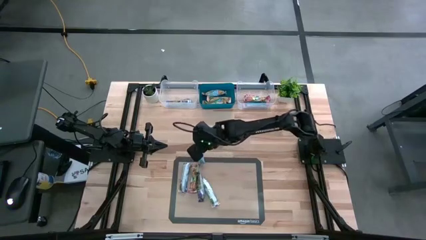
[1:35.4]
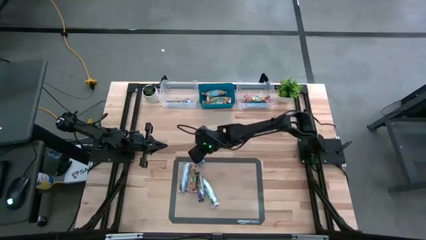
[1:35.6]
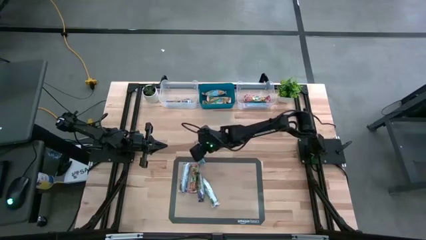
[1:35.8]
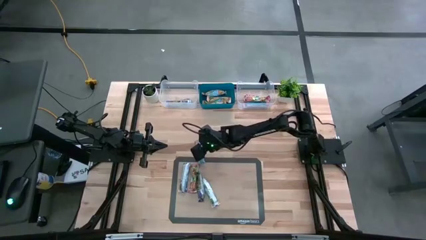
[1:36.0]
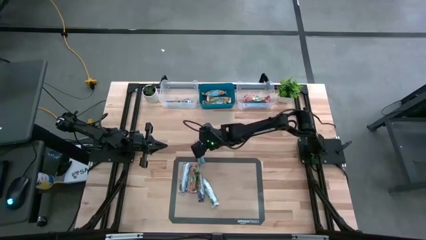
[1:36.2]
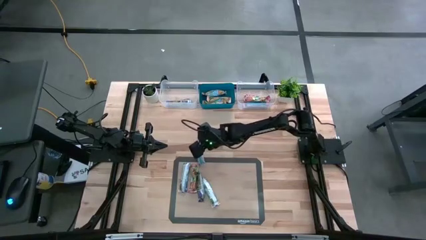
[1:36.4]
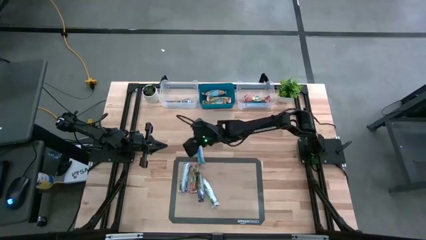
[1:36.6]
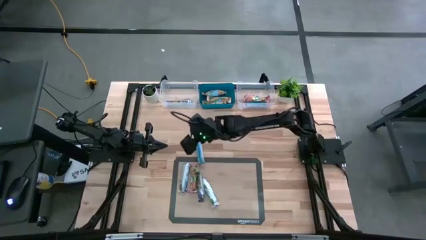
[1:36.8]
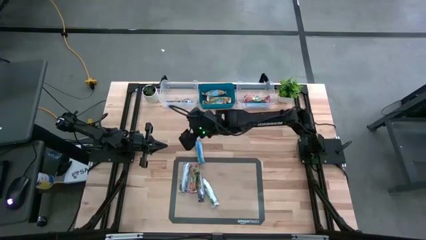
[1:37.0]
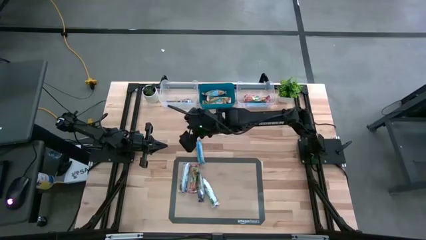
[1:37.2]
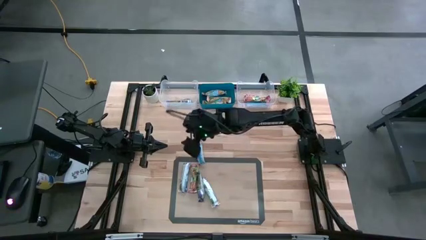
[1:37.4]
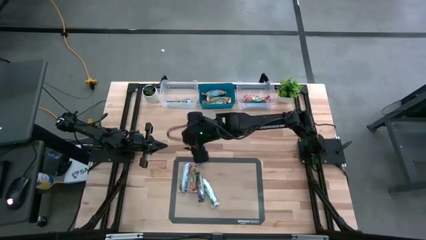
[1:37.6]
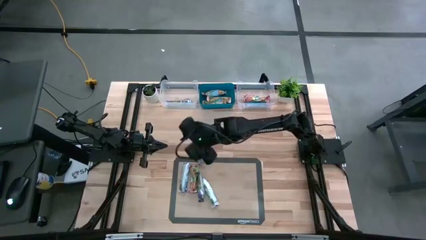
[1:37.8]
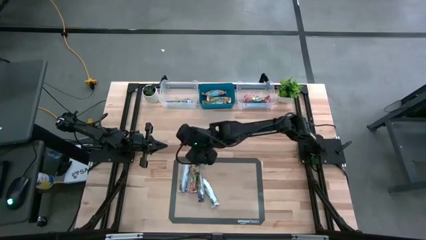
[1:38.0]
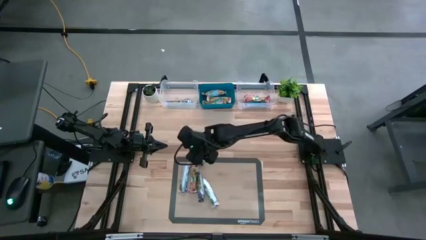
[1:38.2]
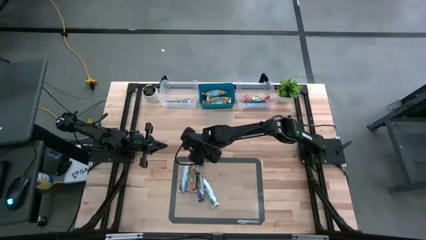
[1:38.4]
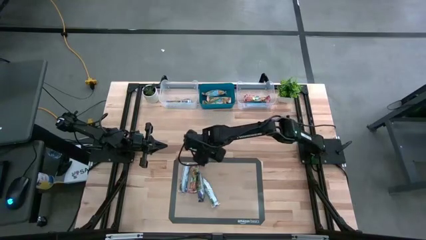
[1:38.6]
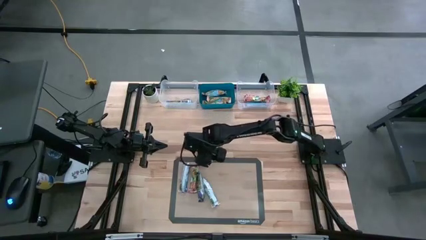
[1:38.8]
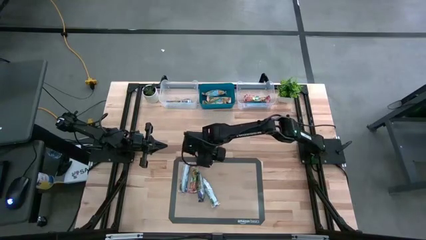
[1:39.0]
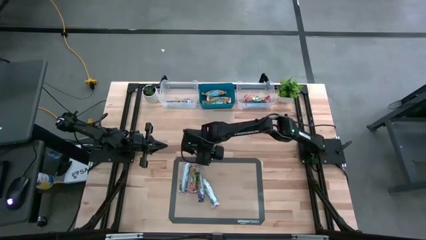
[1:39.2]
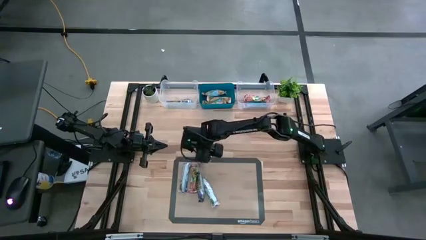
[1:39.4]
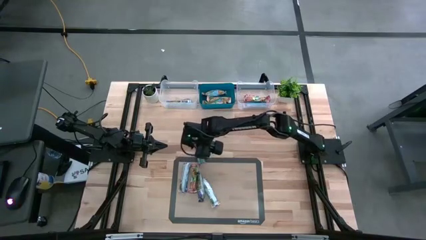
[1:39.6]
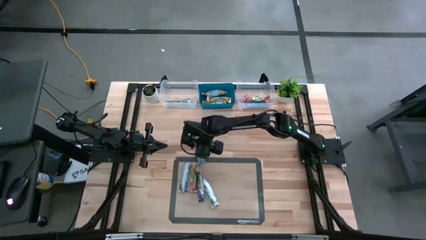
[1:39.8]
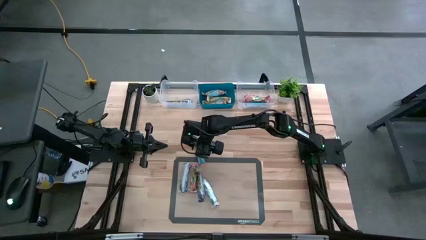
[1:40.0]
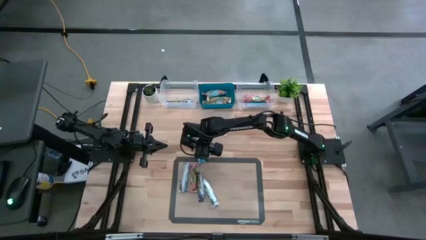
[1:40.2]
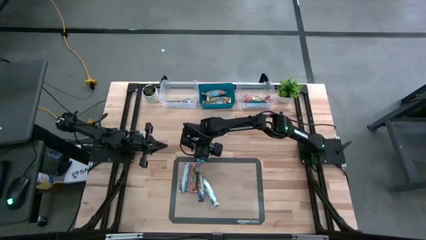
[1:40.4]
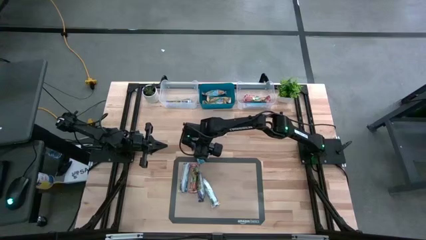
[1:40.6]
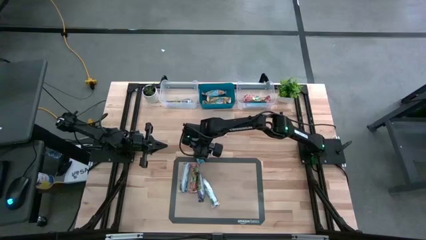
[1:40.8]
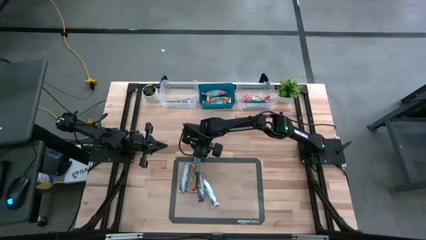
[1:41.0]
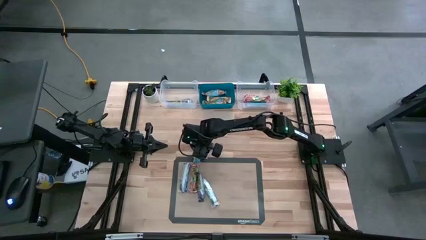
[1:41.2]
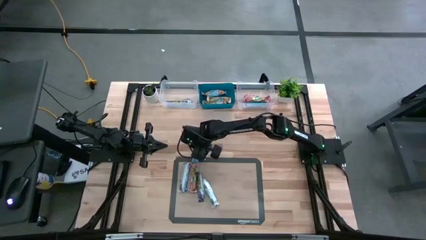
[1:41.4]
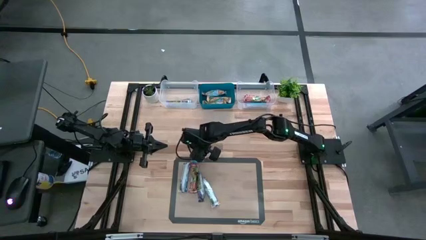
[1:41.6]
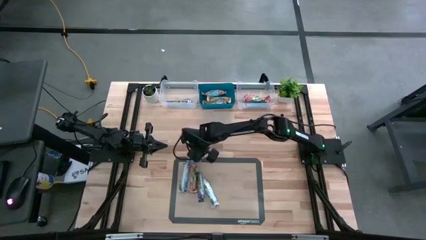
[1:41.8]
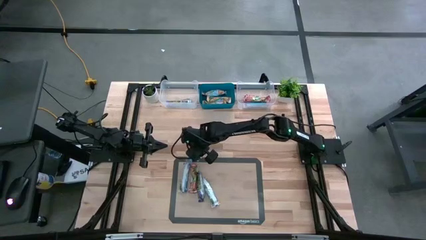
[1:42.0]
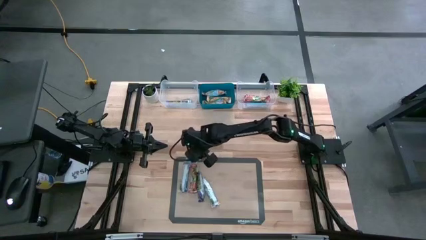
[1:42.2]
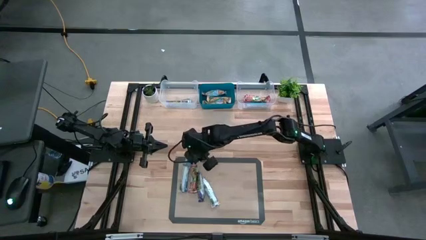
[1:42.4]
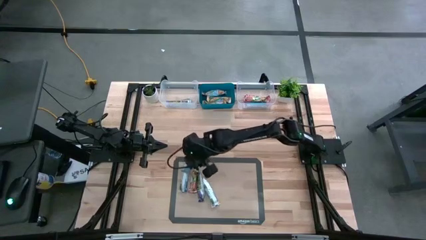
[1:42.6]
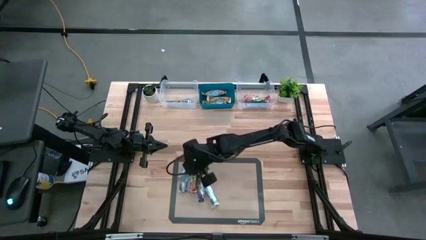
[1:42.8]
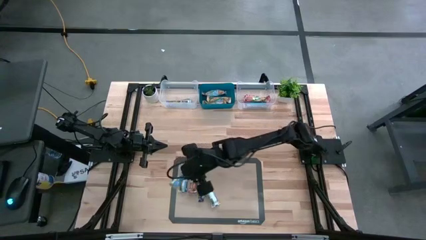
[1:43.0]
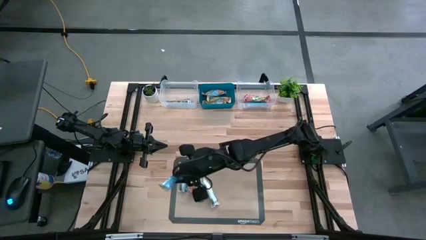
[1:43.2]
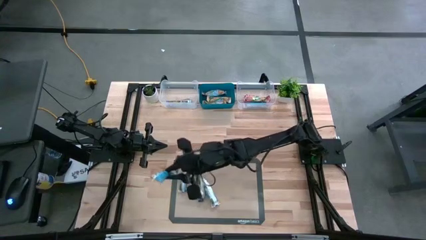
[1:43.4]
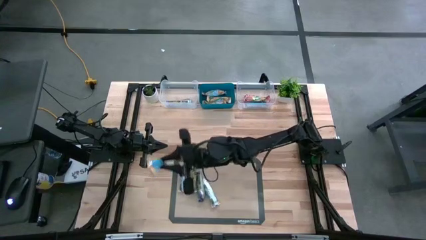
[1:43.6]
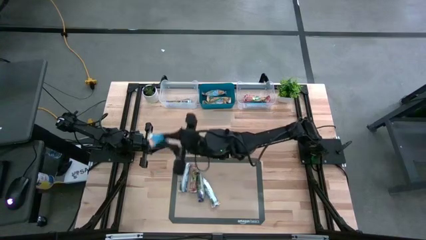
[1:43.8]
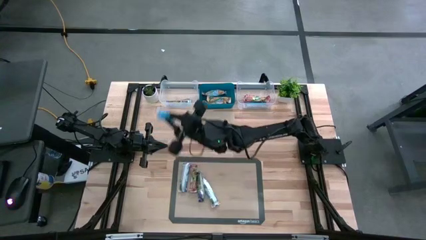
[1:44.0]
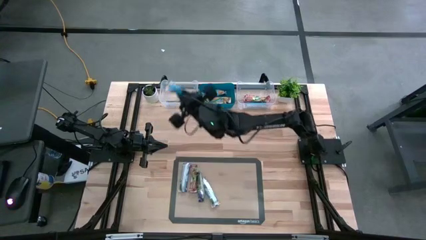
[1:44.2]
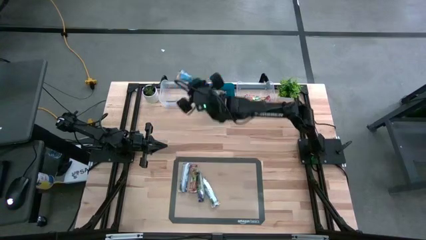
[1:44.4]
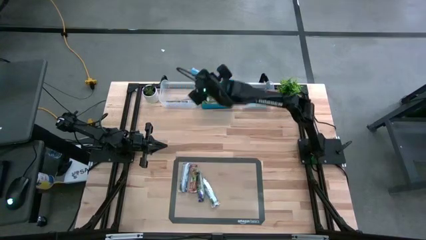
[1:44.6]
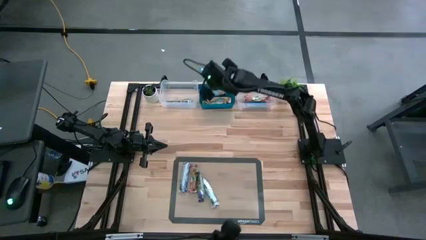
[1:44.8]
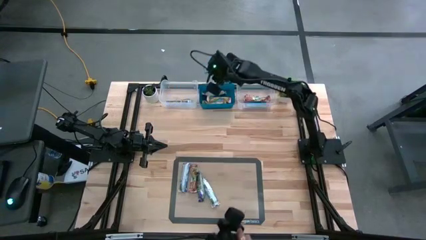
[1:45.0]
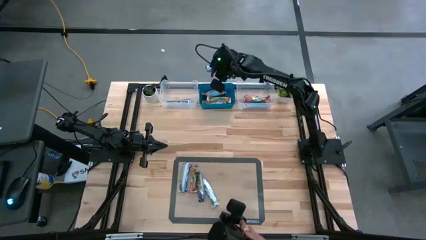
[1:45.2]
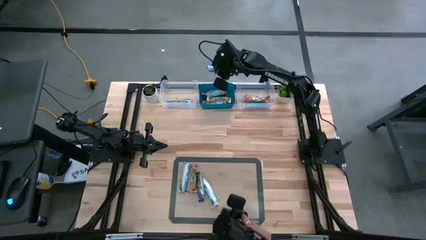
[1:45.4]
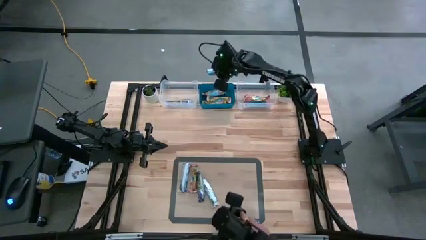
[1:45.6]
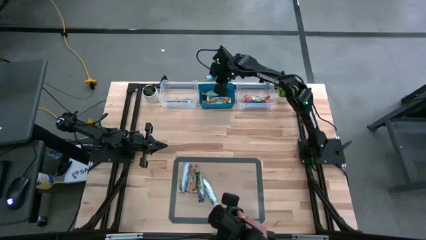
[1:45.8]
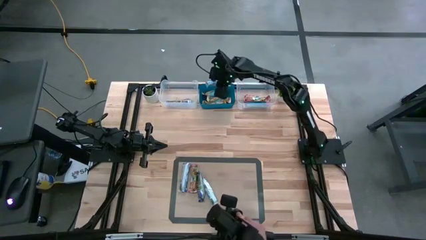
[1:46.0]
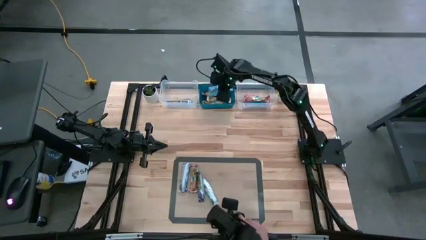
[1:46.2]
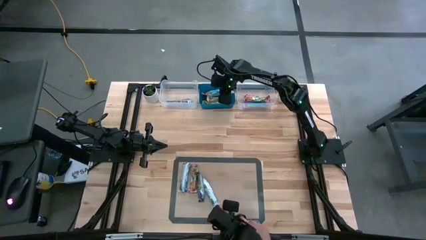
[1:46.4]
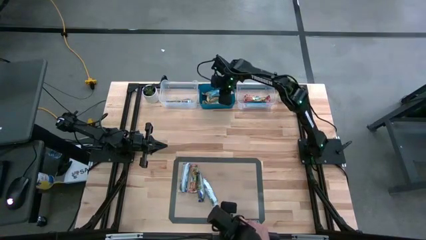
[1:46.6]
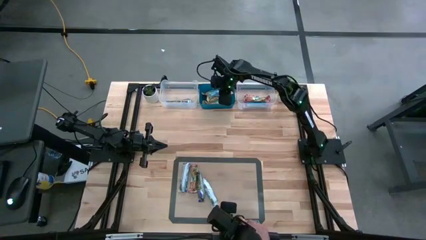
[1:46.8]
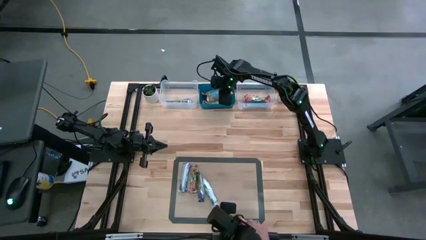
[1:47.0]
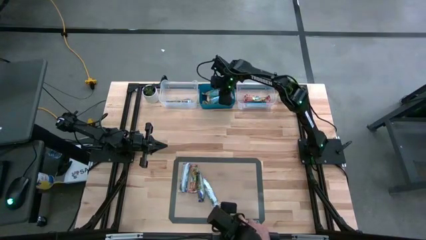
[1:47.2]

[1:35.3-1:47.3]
Task: Pick and place Granola Bars by type
Put the yellow granola bar into the blue bin

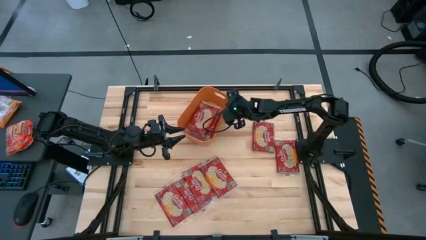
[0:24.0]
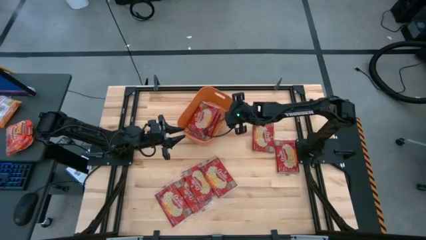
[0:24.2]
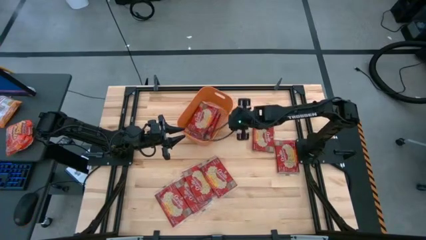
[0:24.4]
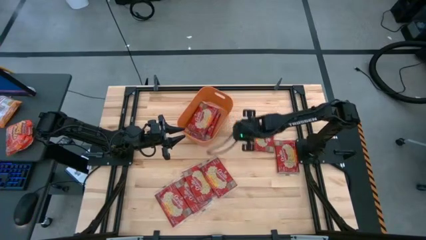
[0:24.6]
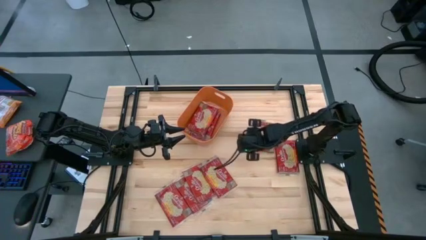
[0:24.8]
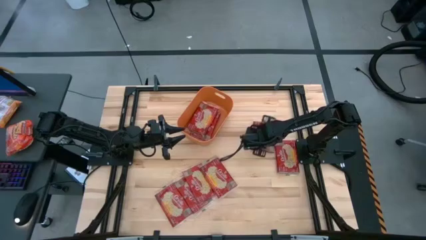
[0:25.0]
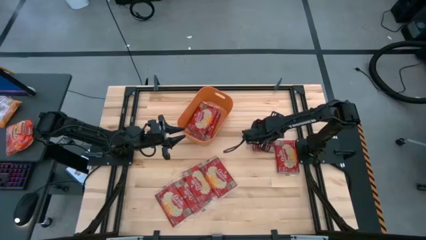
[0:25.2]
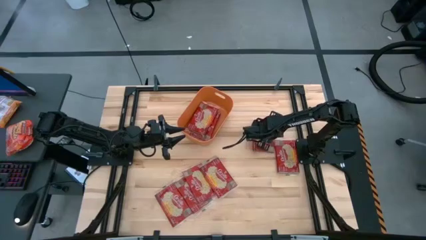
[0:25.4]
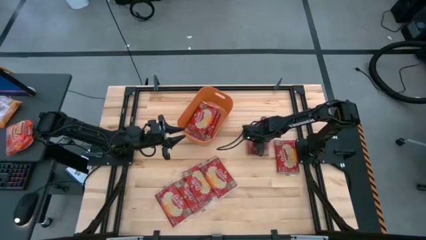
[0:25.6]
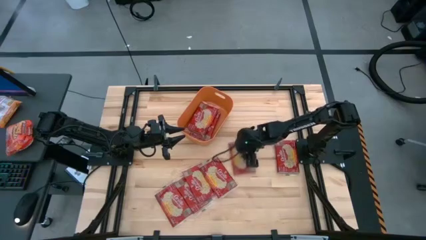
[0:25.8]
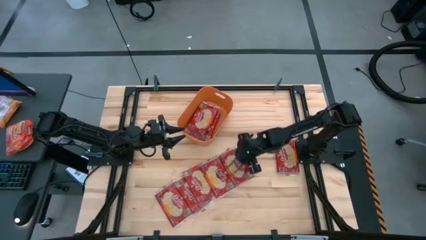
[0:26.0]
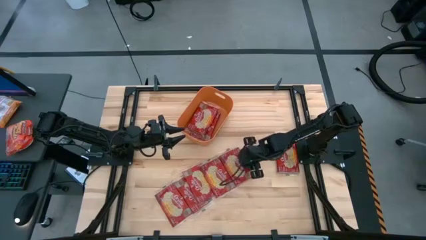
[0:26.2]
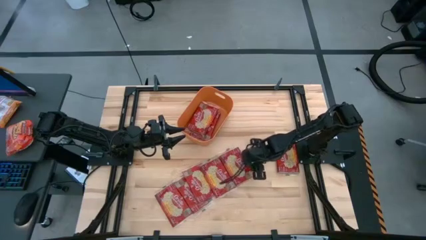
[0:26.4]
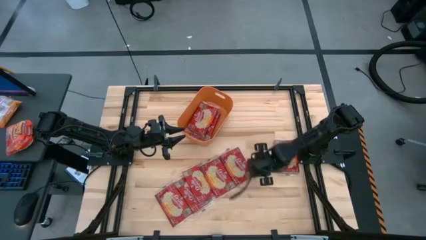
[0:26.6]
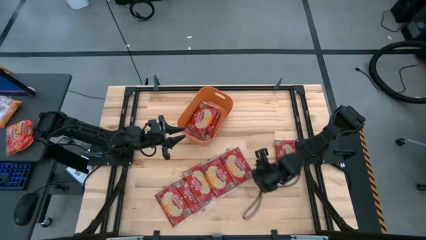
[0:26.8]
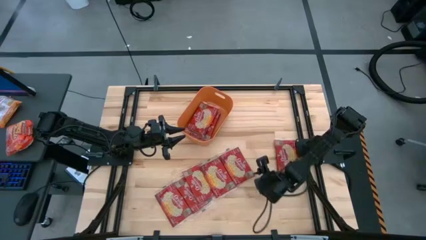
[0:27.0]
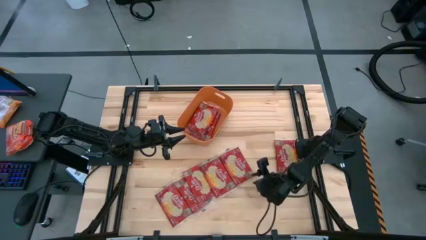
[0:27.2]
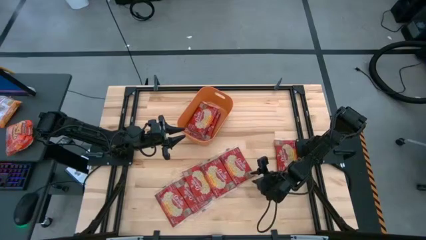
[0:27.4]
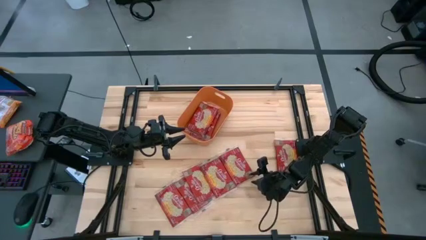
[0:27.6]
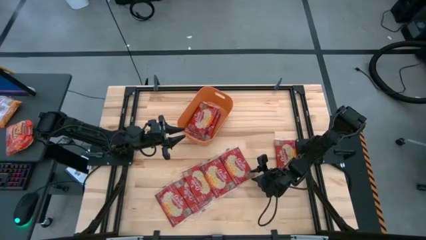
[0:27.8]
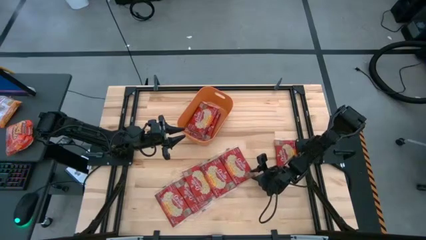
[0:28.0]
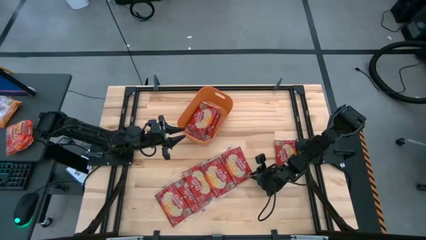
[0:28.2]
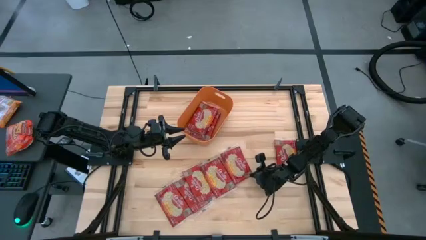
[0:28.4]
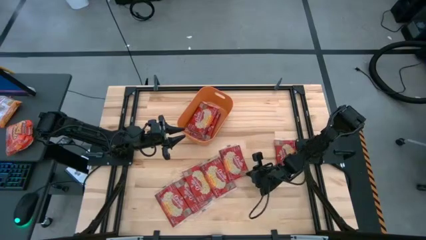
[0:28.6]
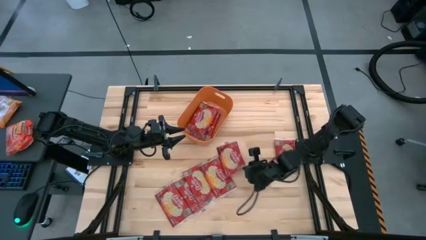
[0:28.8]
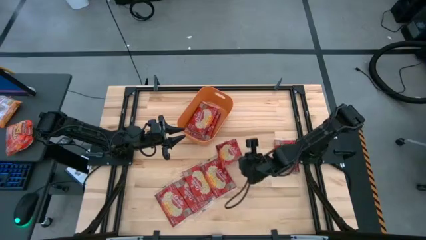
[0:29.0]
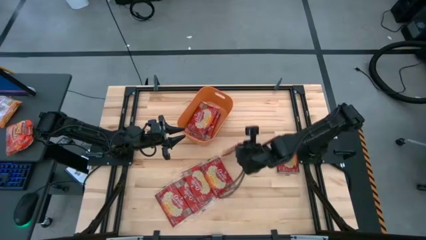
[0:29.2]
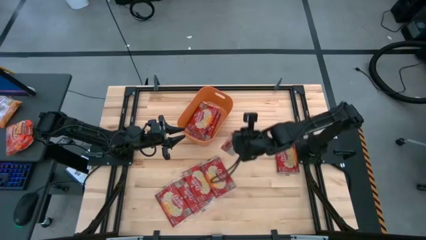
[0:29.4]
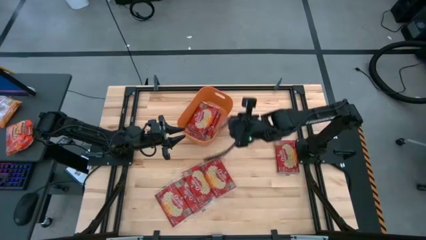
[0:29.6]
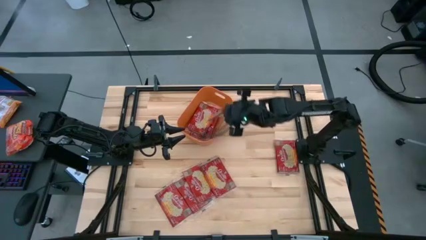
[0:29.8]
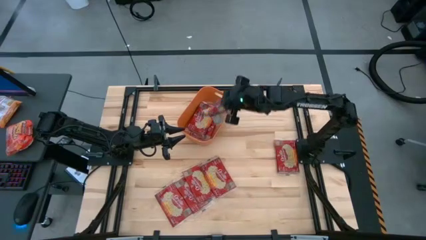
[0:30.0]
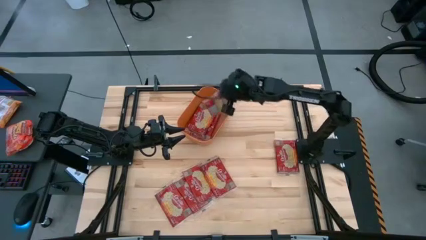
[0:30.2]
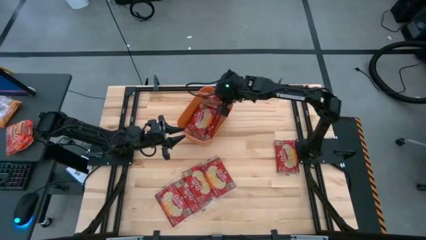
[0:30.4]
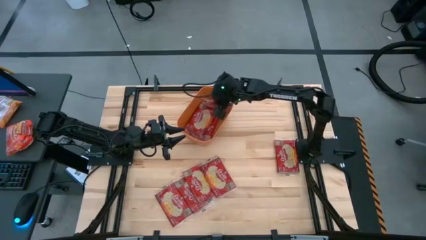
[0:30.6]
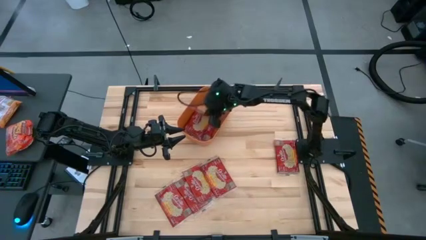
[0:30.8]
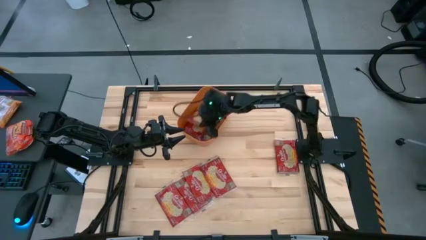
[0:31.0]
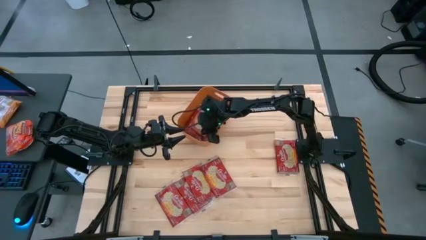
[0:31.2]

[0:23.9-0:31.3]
Task: Sort popcorn bags into baskets
Put the red popcorn bag into the orange bin
